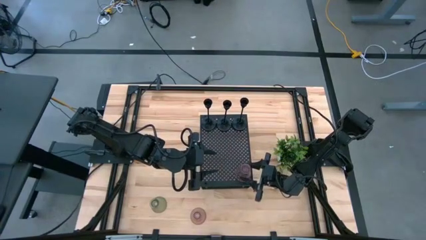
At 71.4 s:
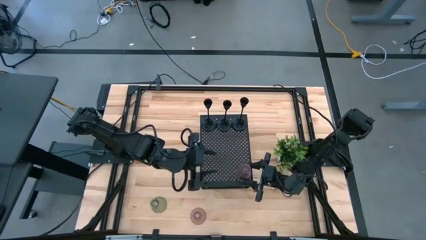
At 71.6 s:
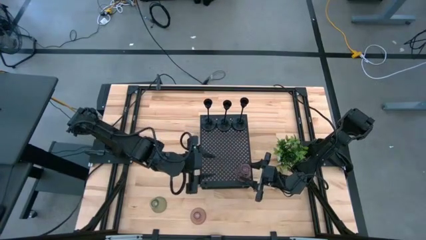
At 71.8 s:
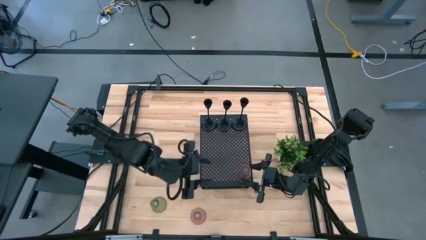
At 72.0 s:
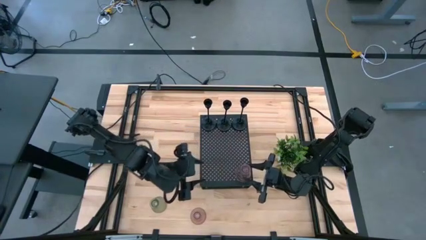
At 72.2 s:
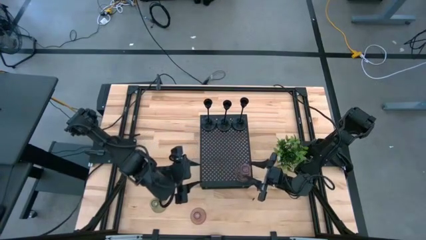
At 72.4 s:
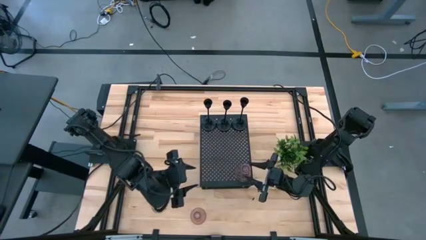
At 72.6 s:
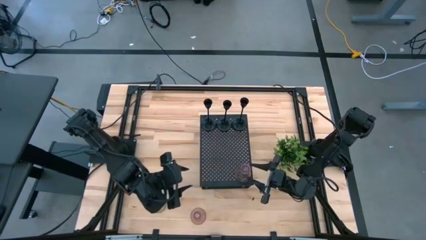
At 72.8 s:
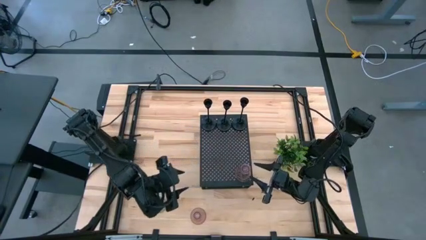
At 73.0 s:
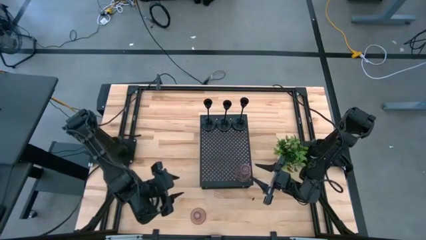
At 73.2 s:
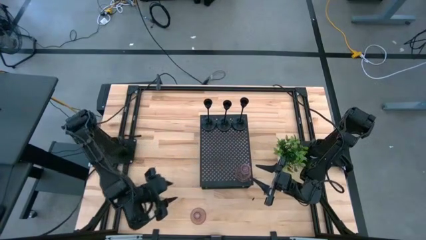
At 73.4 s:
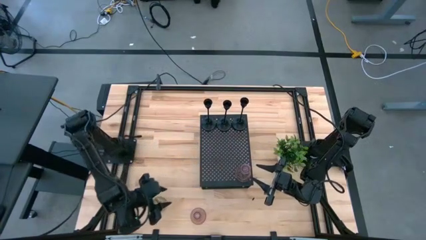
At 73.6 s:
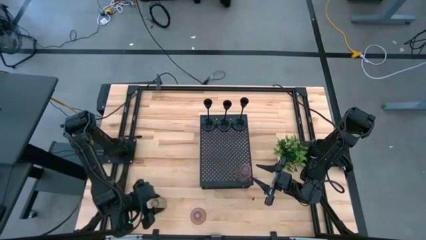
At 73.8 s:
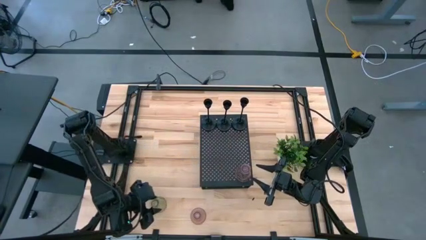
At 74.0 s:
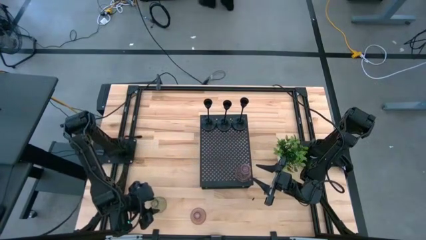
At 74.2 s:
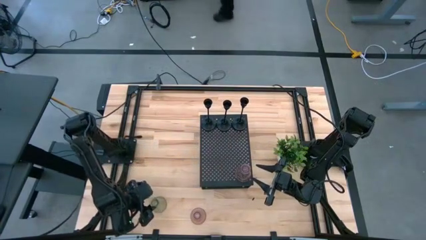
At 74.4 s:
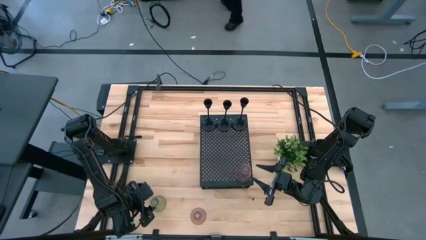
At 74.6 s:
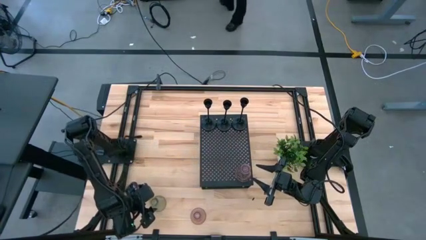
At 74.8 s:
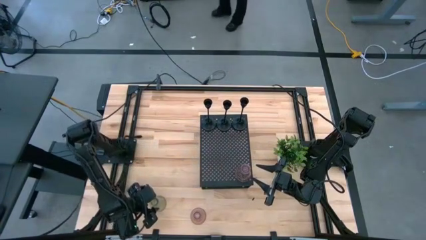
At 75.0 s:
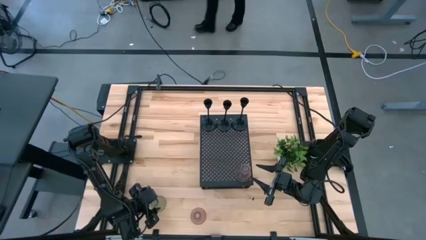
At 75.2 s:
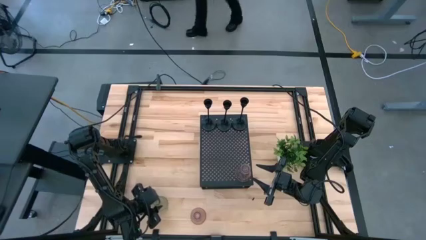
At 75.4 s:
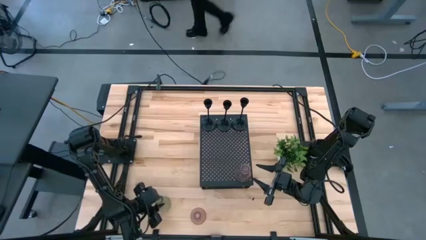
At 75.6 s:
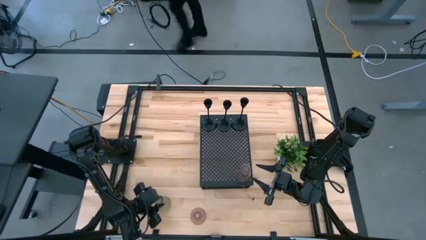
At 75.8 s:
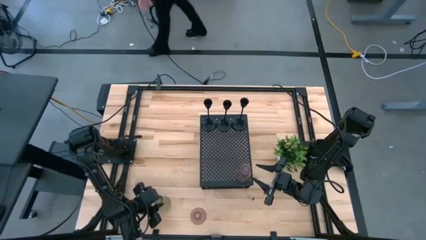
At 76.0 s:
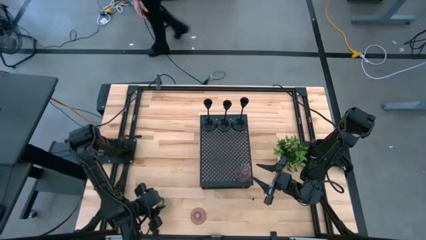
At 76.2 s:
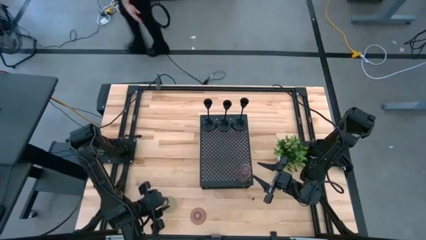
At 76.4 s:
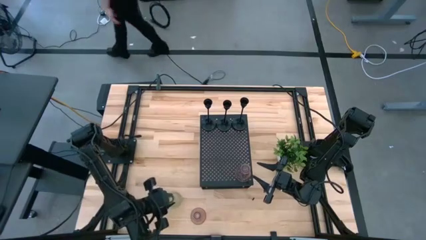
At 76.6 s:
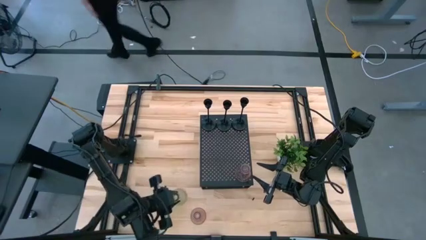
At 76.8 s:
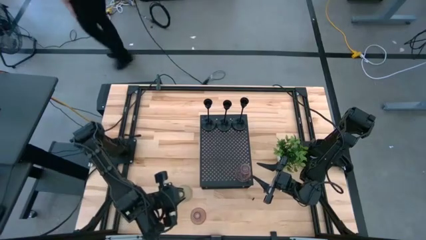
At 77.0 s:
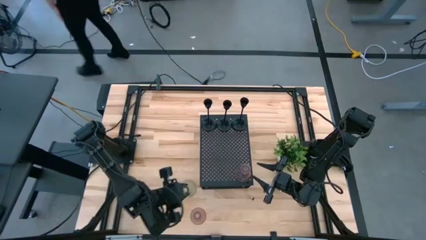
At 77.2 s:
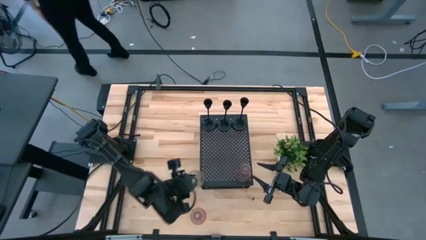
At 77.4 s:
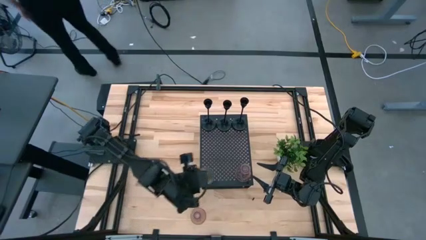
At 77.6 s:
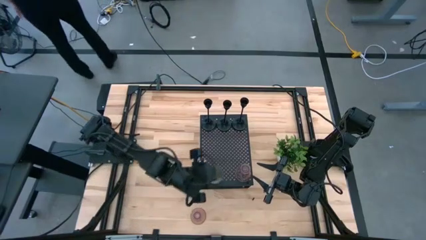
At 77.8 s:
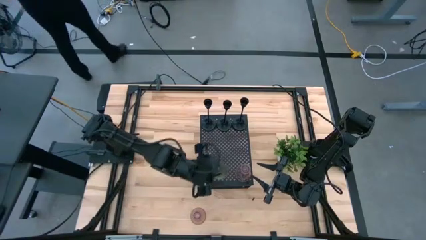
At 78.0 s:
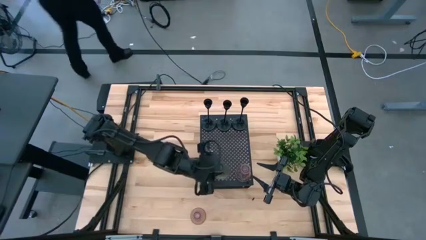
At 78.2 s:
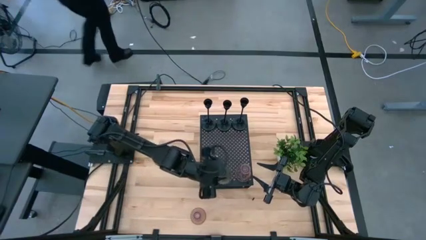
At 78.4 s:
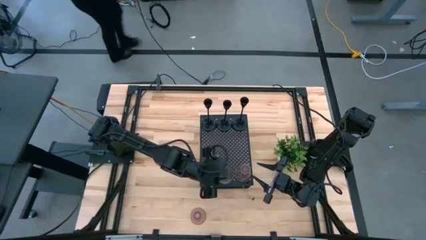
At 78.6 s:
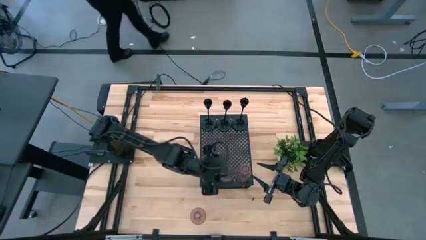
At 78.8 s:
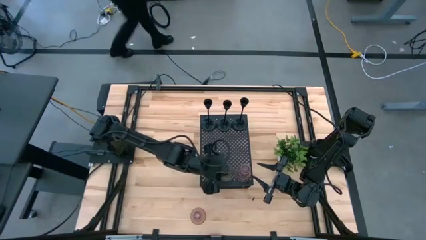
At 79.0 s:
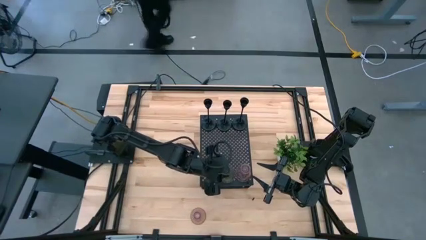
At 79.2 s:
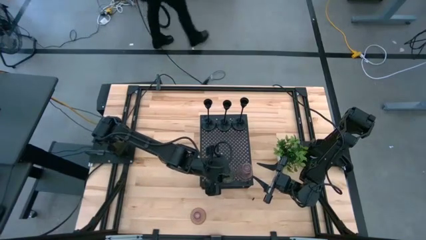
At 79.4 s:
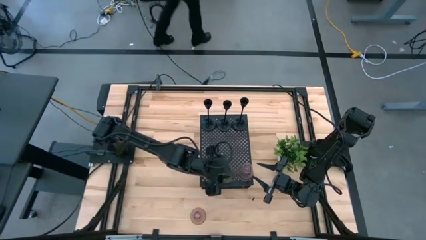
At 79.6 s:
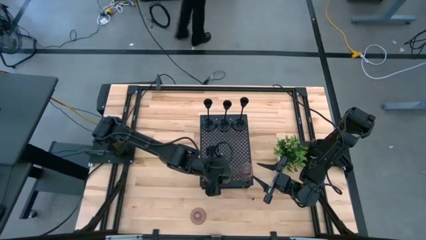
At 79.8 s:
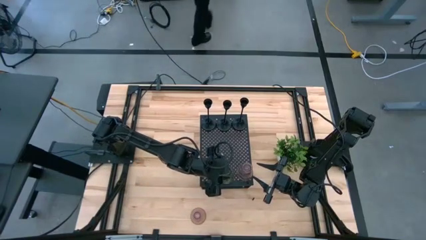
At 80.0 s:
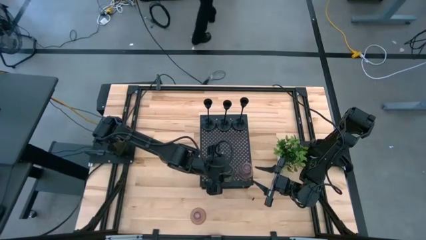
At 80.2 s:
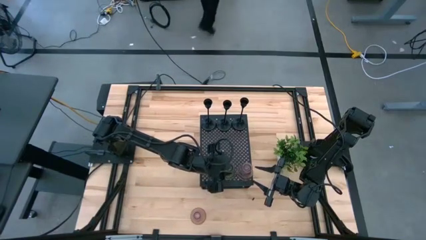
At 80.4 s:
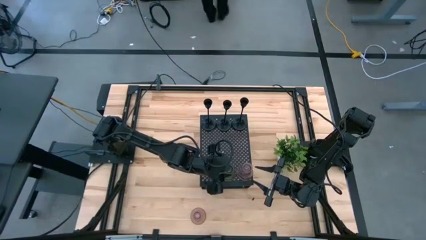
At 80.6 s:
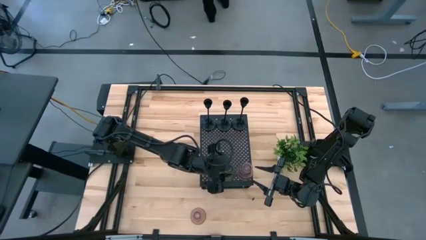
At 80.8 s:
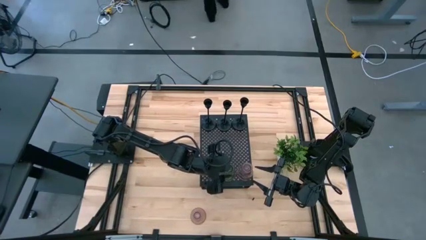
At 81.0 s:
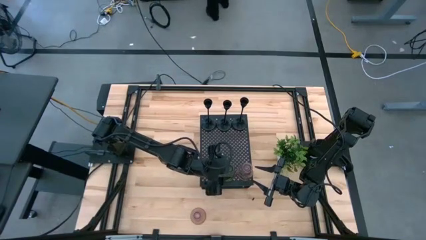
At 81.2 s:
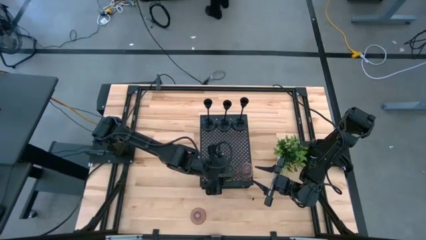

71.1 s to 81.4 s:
Task: Pick & Place candle stick holders
Put the green glass candle holder on the shelf

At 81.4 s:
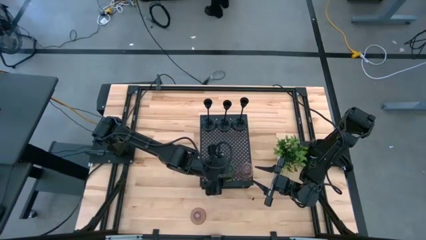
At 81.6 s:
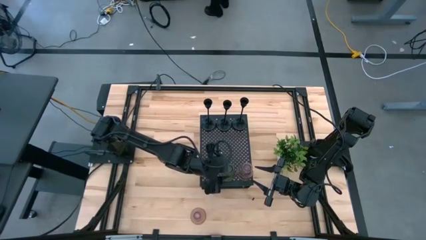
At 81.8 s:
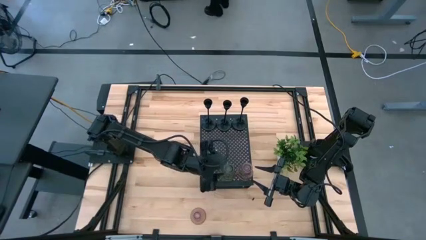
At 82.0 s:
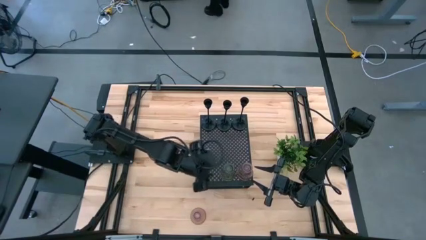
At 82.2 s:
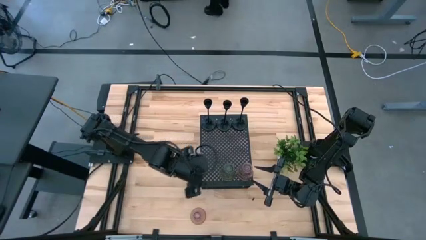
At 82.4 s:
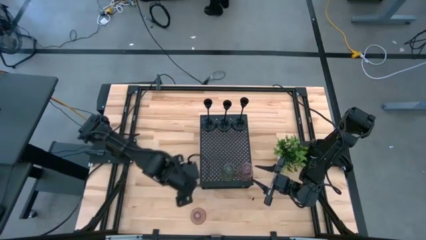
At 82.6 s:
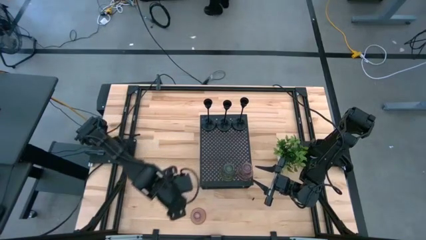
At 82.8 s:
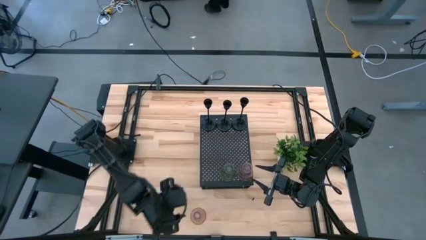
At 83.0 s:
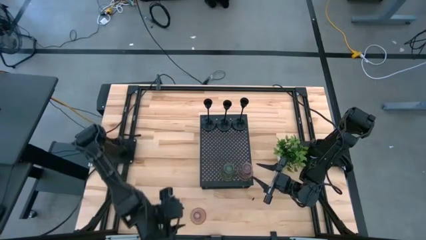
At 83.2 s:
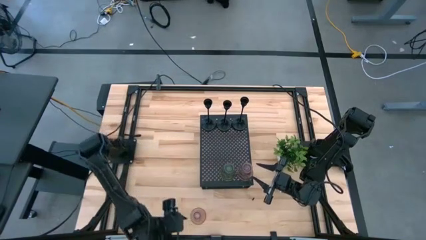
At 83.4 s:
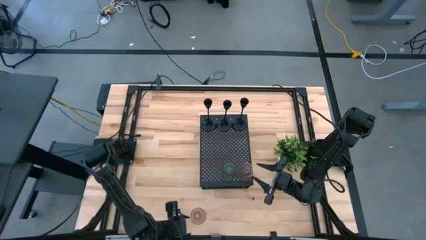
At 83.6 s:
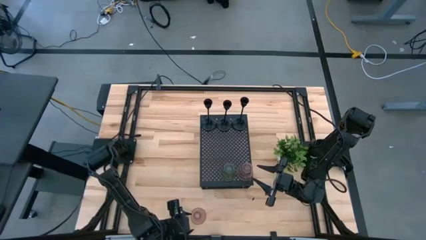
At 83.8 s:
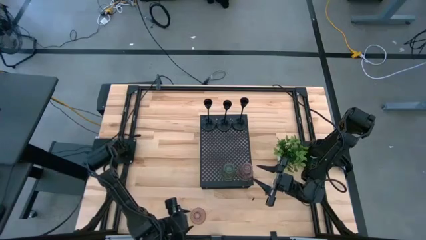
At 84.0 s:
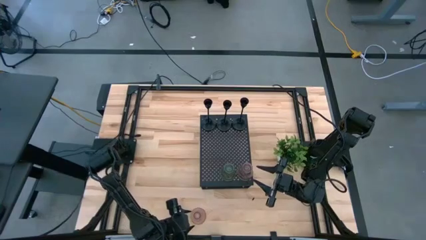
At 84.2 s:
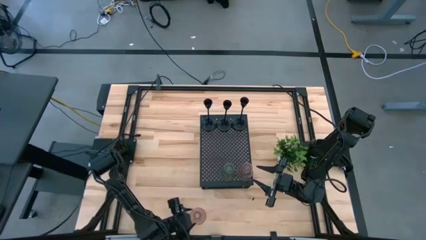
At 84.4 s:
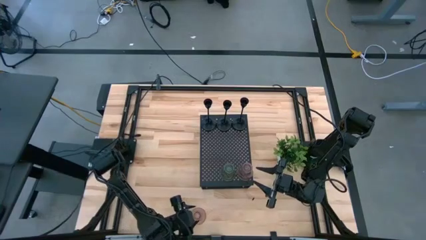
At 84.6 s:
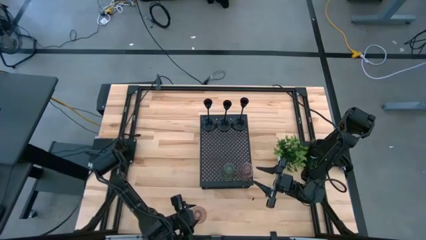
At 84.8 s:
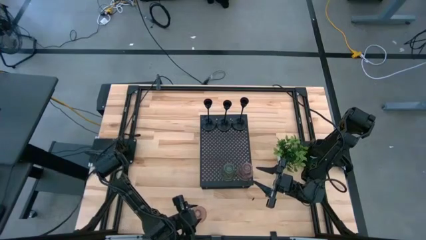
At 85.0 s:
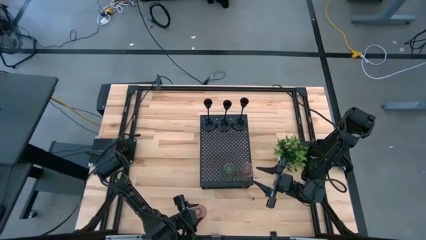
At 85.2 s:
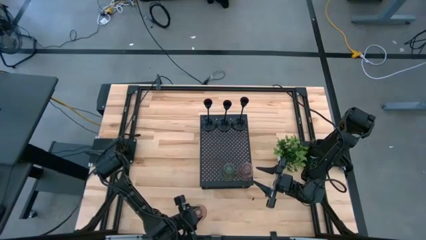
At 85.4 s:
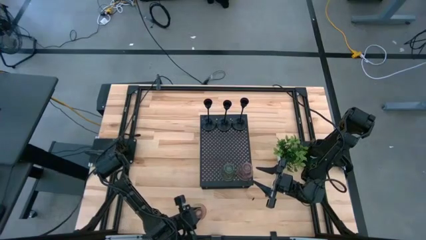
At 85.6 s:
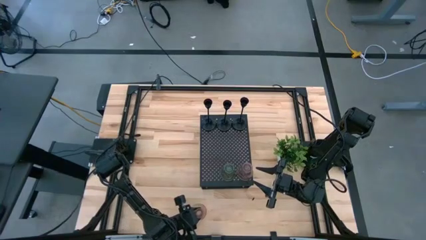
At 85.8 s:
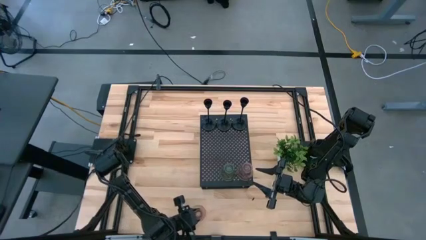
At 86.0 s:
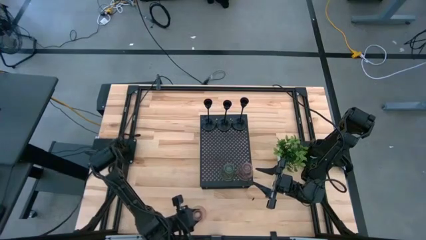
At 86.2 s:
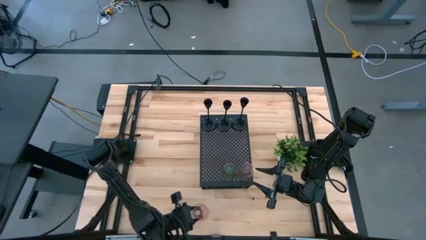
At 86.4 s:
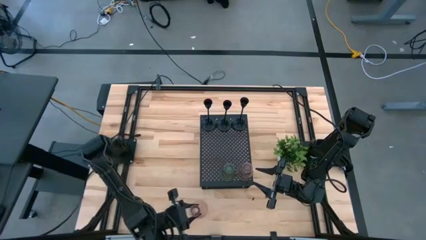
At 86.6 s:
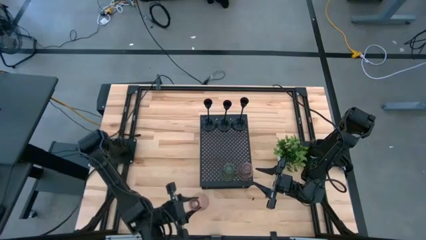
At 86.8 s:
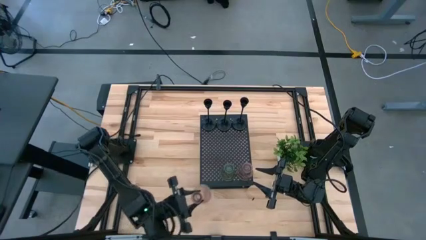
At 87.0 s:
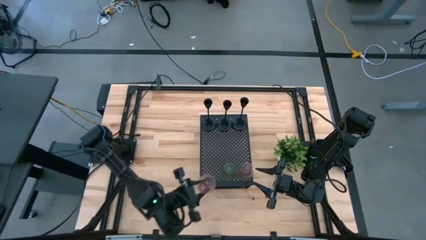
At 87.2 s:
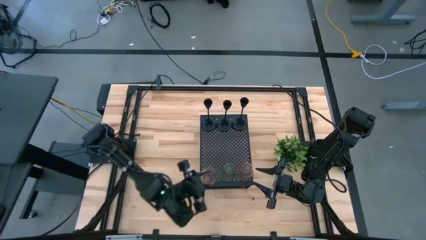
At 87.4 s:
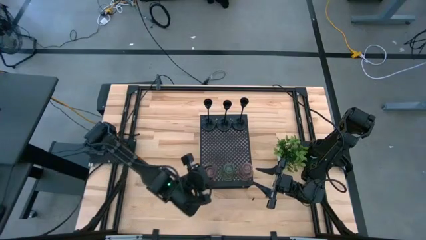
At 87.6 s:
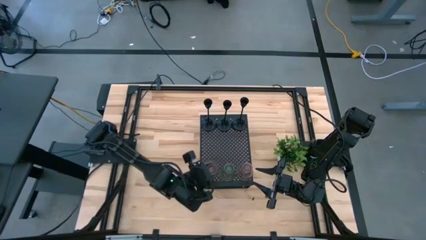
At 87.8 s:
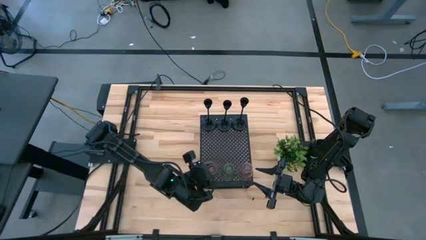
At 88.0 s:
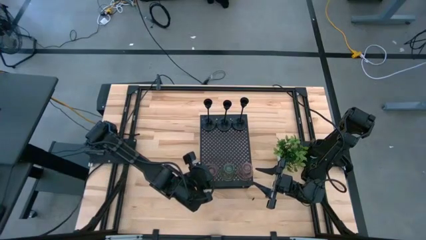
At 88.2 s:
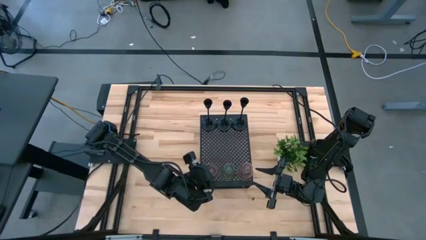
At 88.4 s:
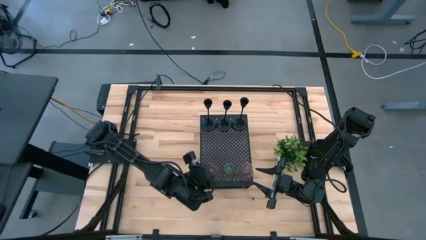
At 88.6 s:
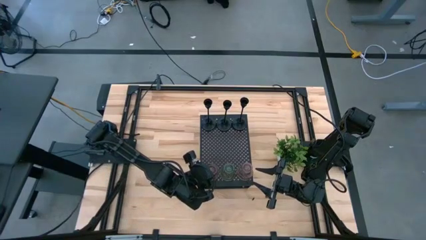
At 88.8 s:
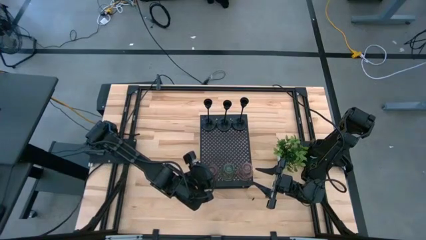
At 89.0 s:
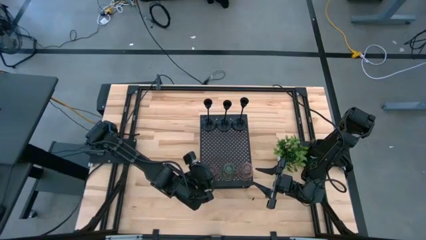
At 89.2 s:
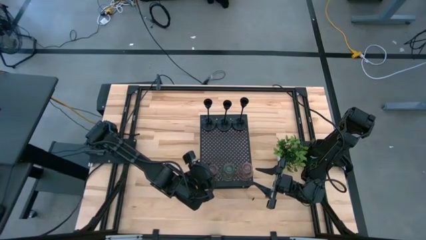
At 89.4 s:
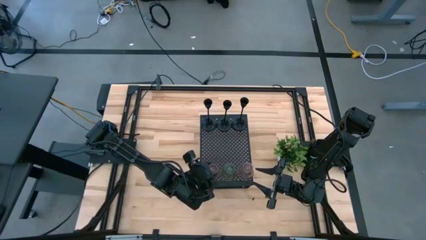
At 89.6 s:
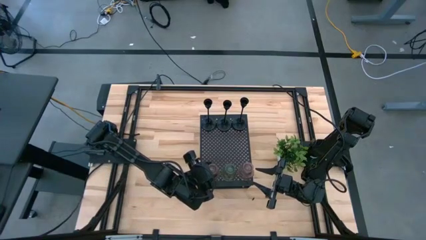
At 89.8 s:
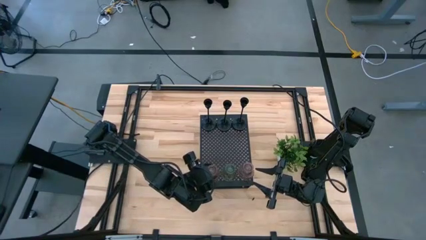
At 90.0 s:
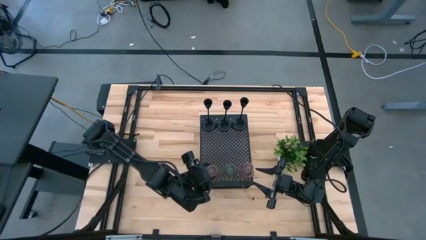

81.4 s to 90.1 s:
Put the pink glass candle holder on the shelf
